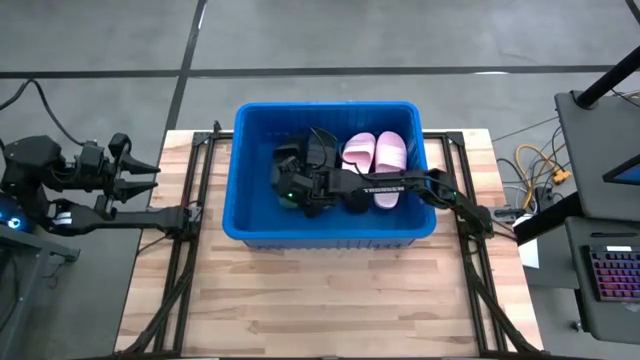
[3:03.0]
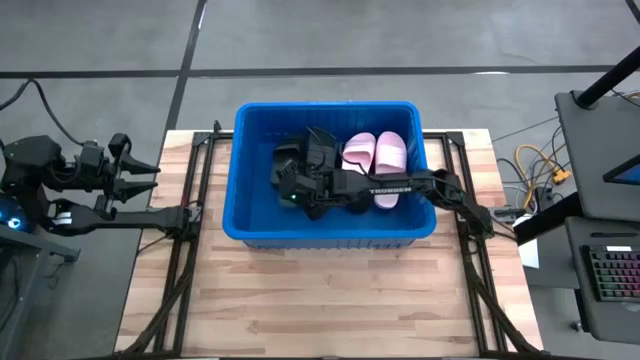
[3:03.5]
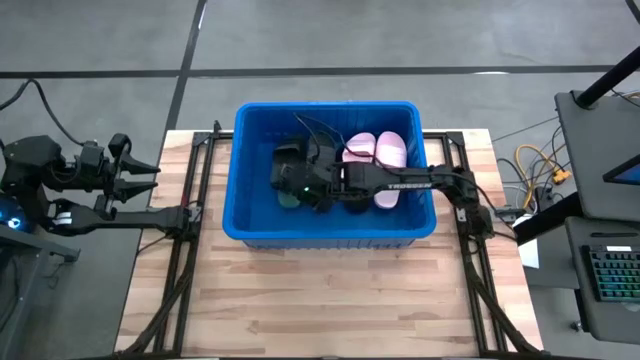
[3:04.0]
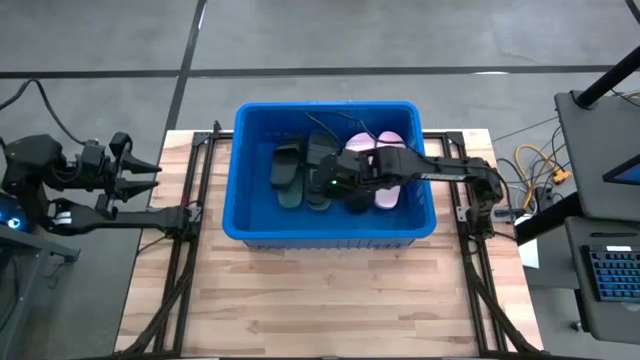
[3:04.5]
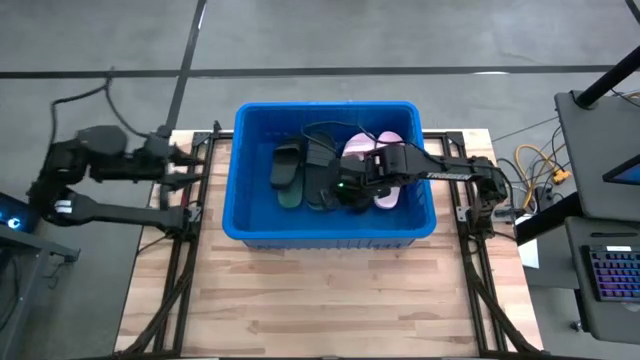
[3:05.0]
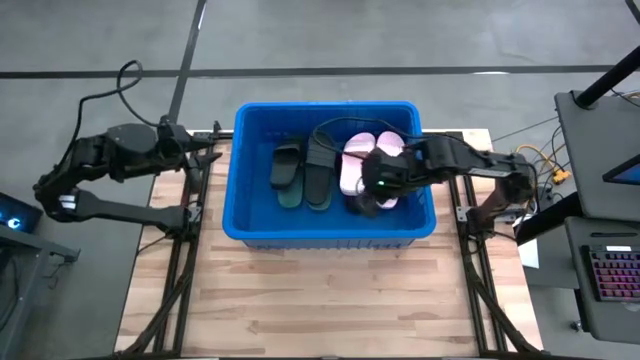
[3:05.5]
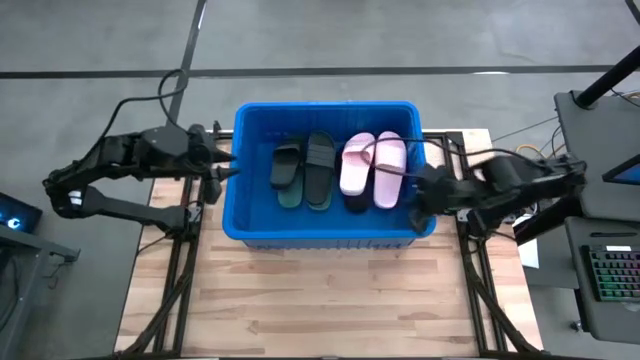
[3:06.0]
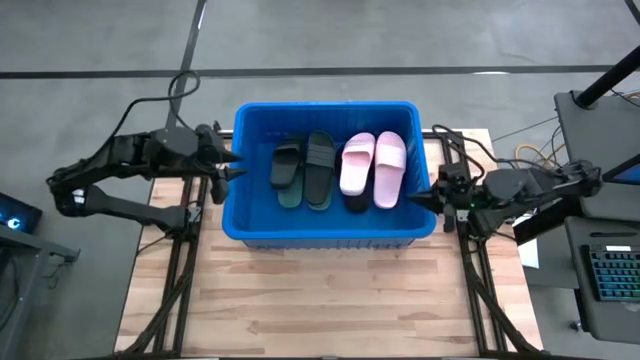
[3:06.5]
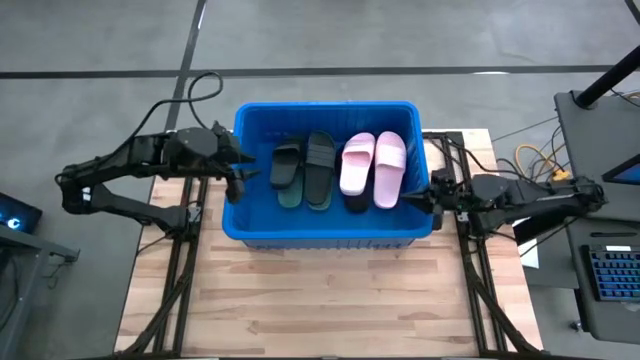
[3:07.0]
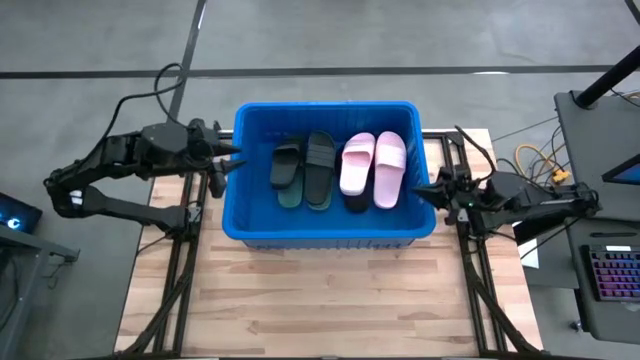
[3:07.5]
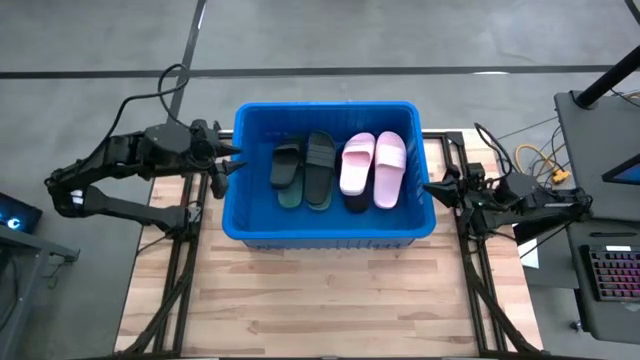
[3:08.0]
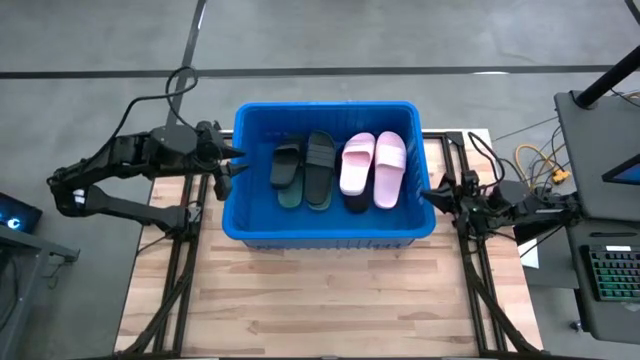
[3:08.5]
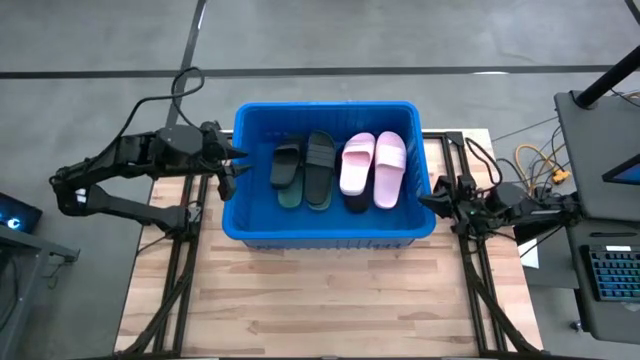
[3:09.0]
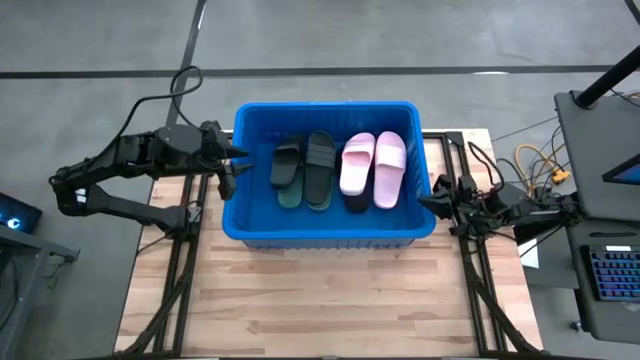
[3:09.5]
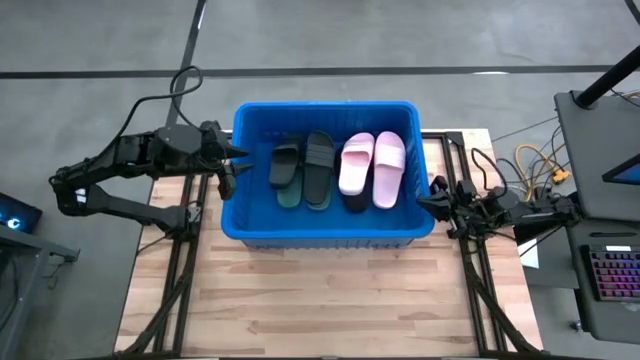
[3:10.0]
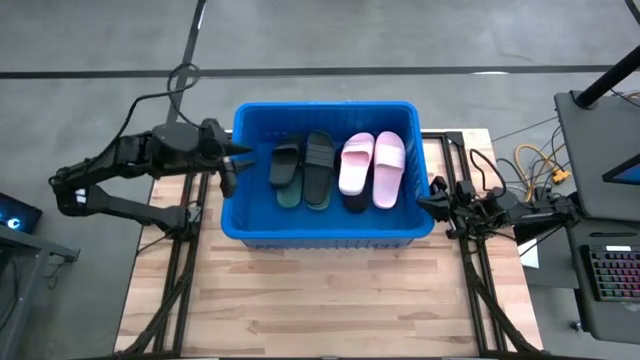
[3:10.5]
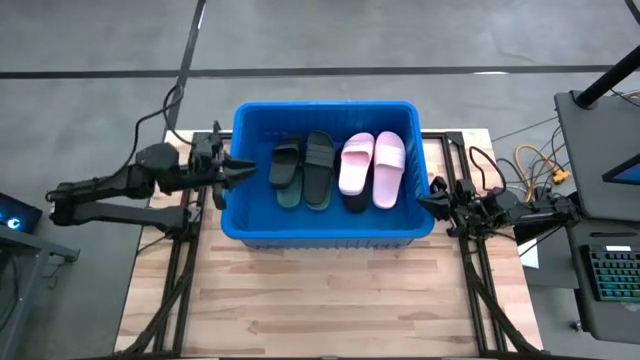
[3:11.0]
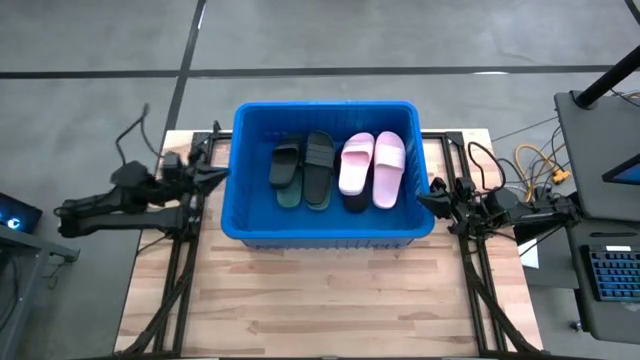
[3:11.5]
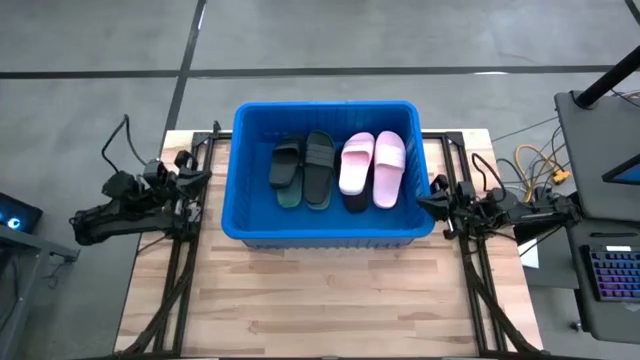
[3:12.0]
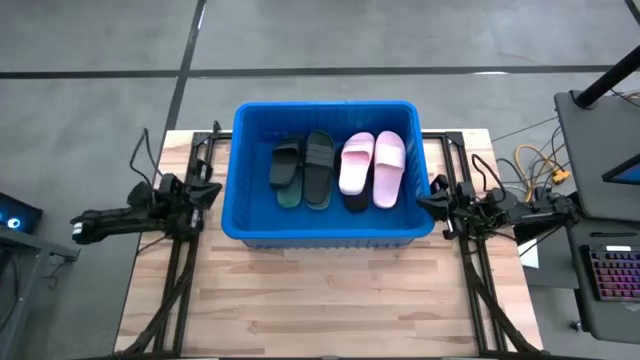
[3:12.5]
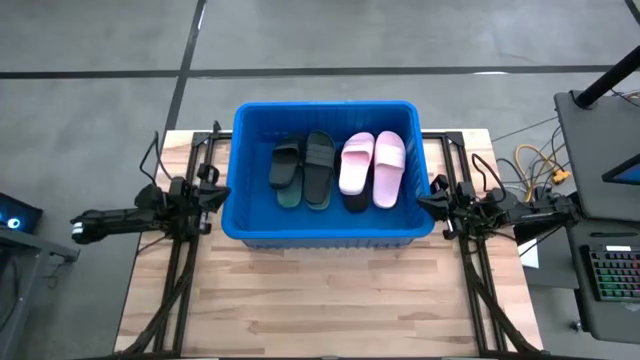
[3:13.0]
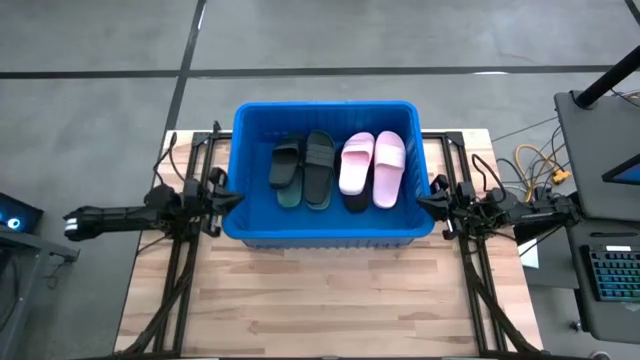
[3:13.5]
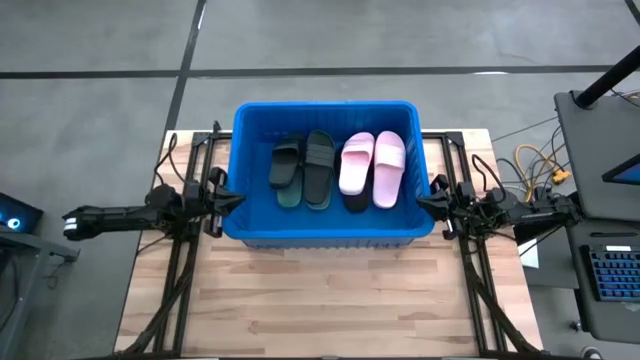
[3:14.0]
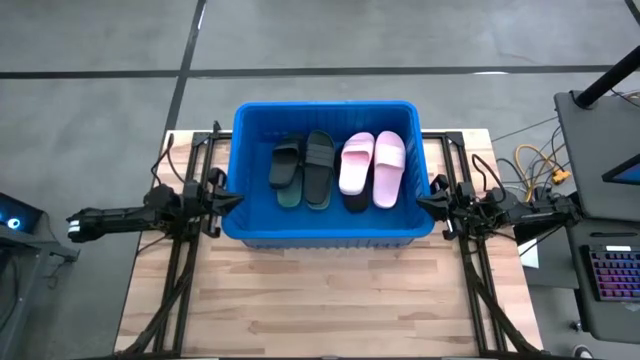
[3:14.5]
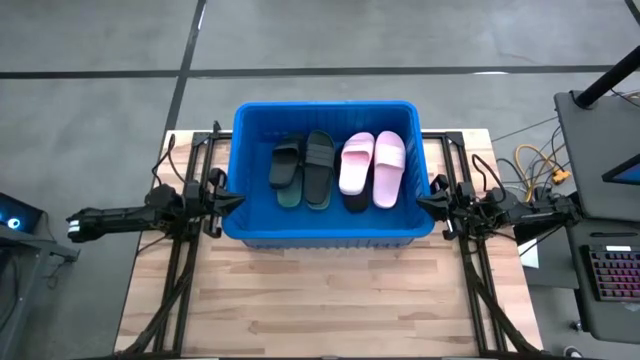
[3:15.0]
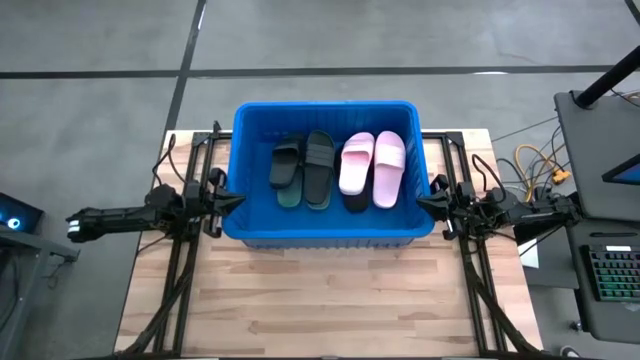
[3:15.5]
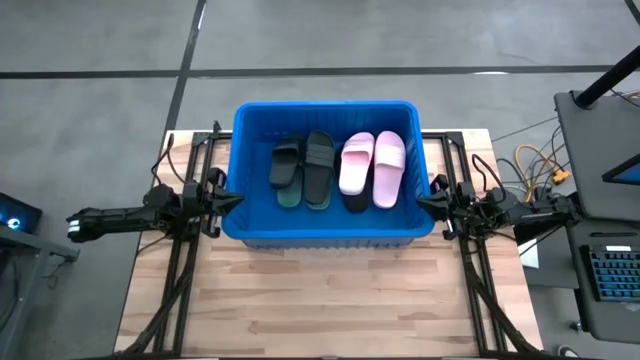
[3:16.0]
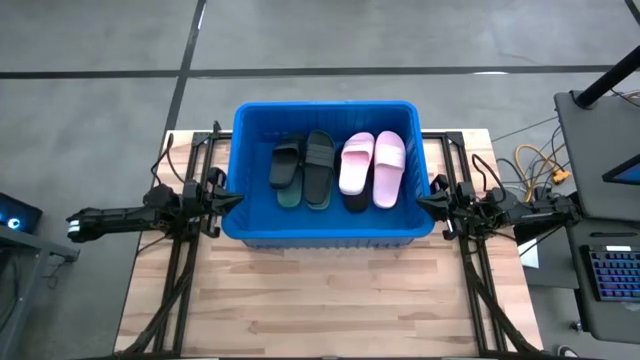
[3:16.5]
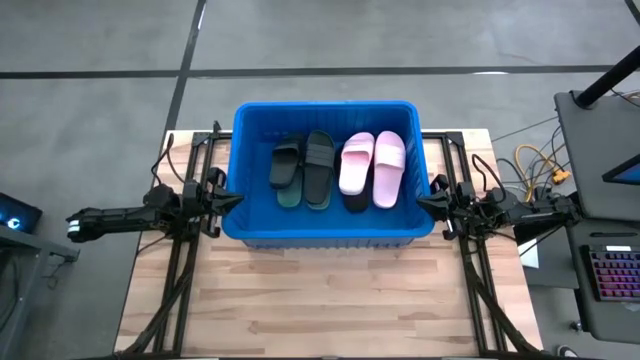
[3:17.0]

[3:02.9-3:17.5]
Task: Pick and place slides into bin
Return to Home Position

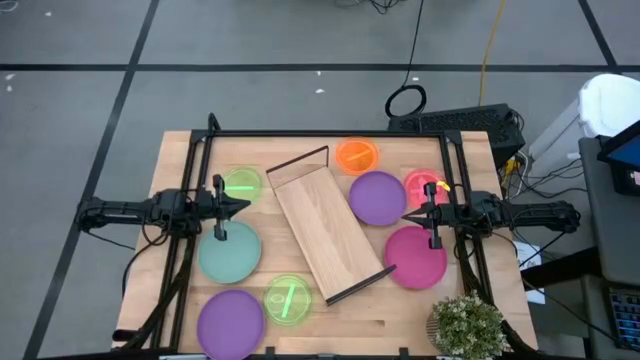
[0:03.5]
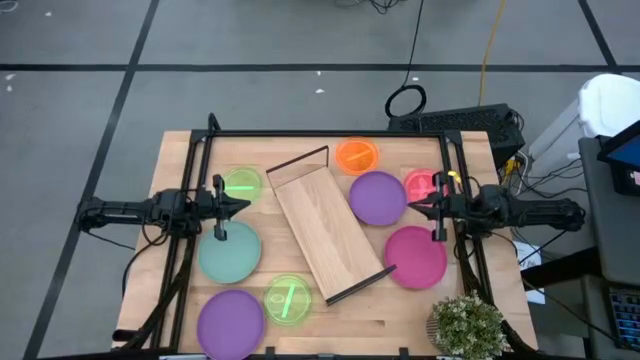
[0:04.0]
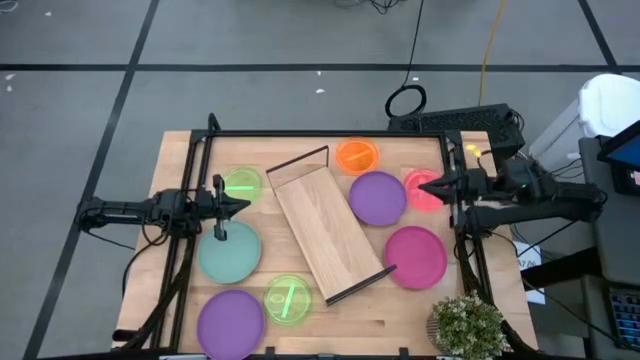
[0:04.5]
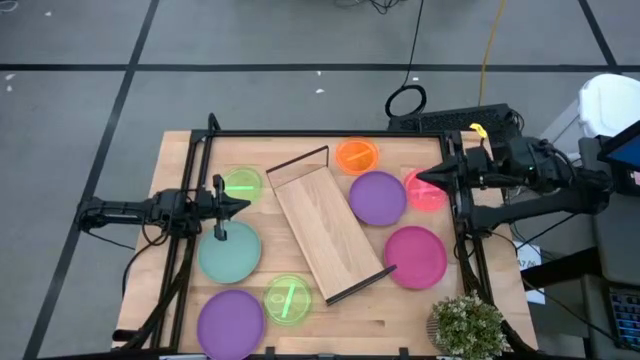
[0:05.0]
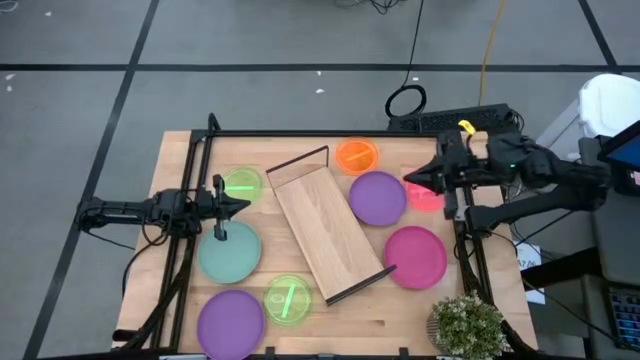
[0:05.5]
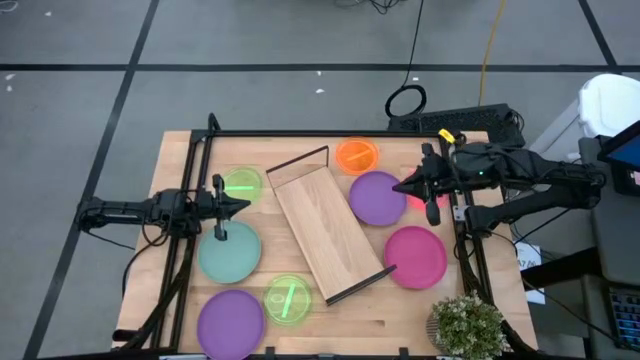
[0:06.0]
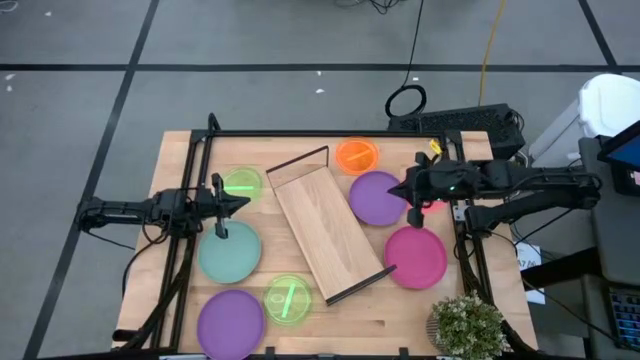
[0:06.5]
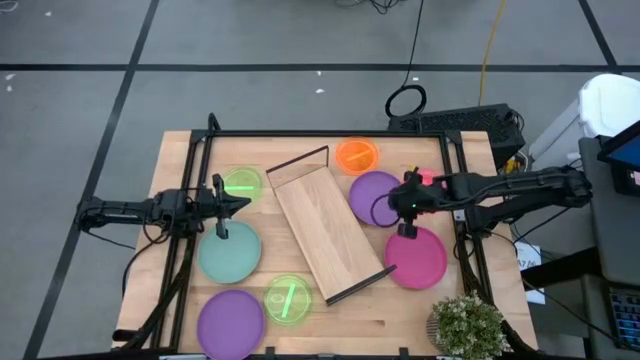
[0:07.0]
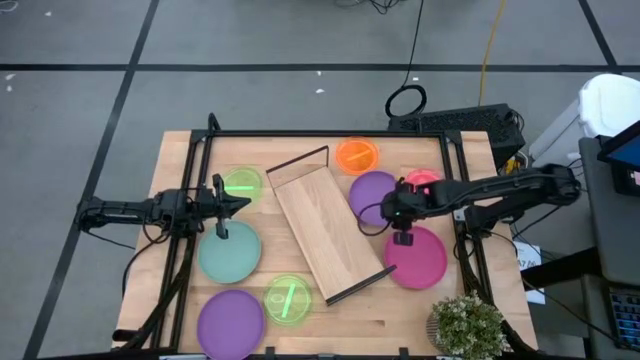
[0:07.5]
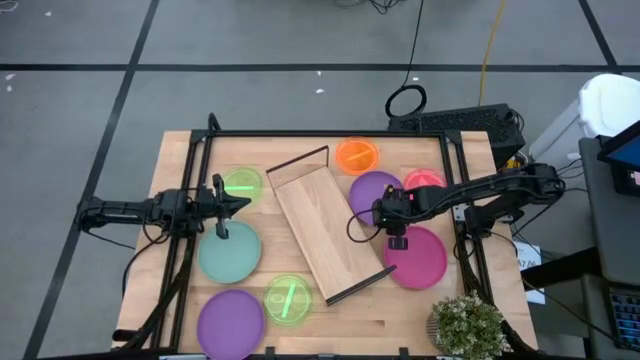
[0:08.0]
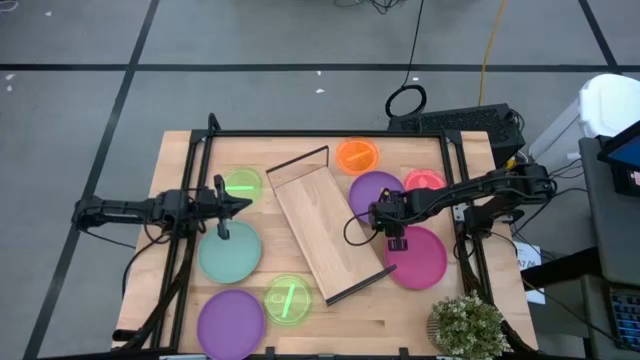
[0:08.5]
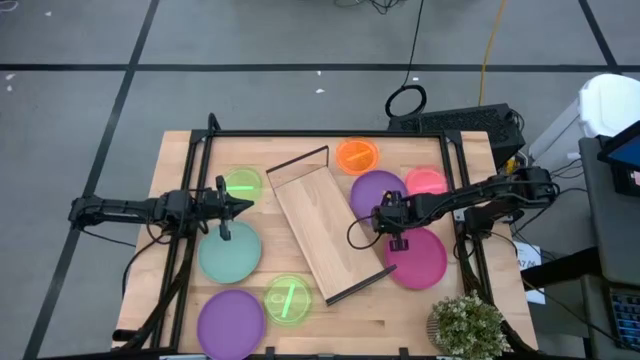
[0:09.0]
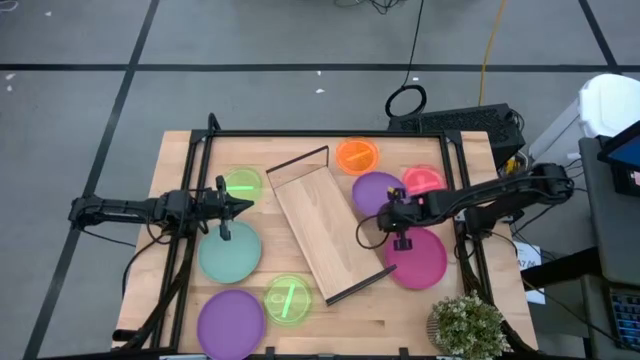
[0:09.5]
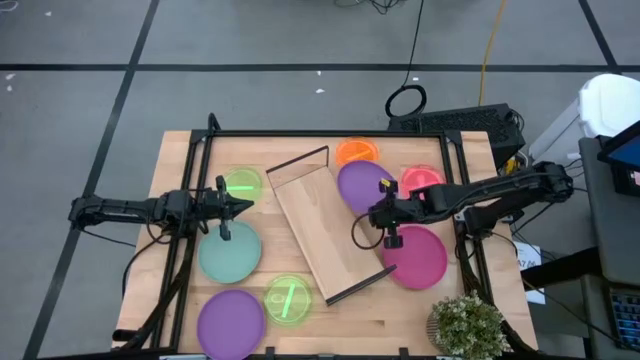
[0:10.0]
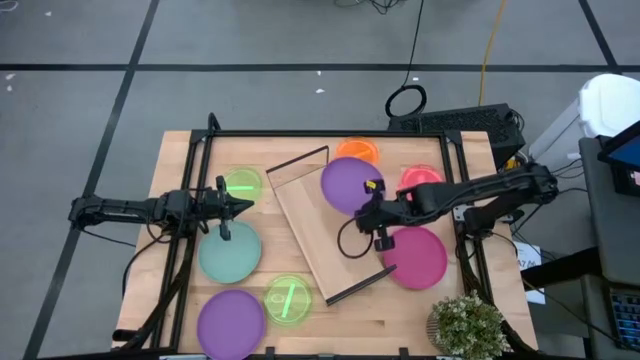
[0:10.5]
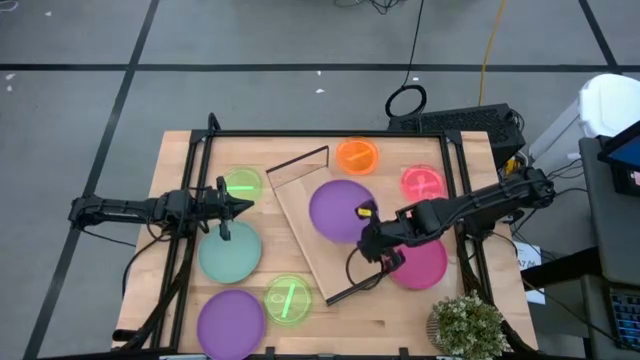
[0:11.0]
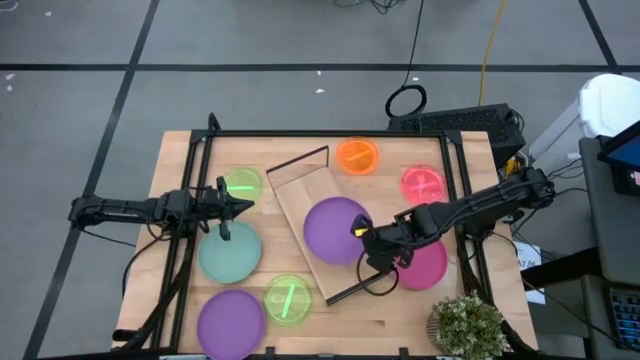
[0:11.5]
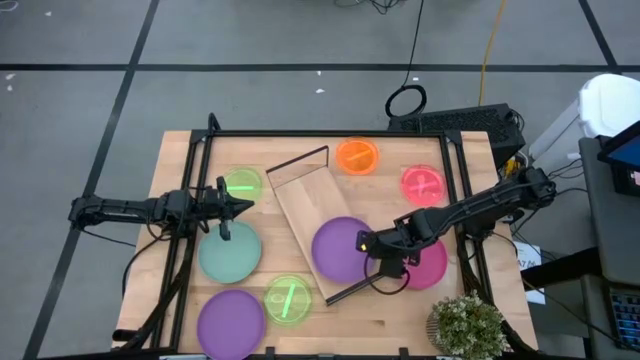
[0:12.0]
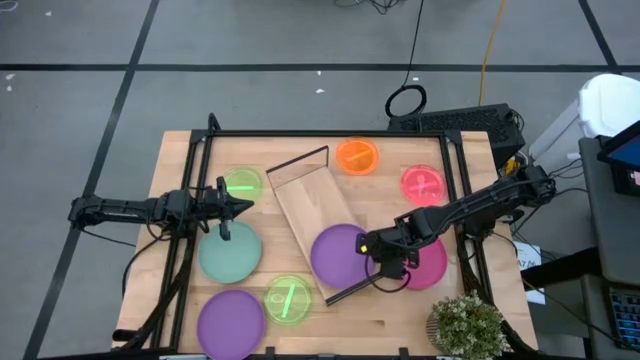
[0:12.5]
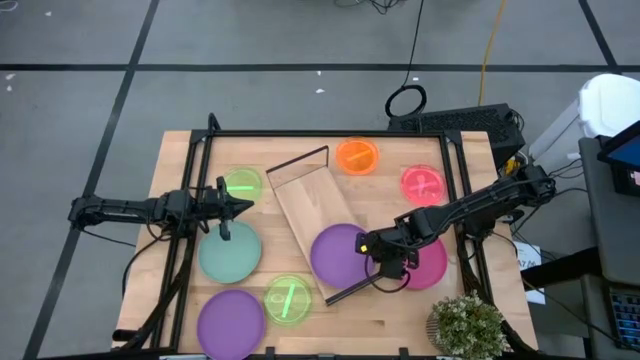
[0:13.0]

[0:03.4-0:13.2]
Task: Place and stack plates onto a shelf
Put the right purple plate on the shelf
